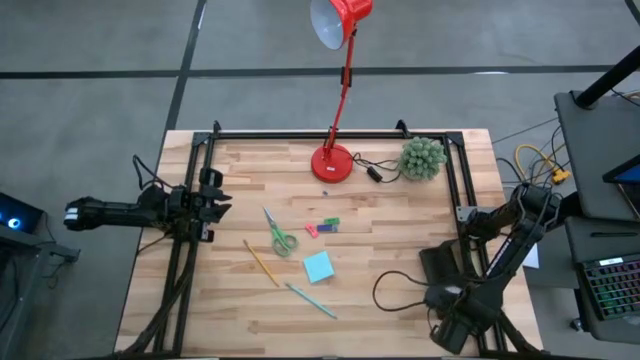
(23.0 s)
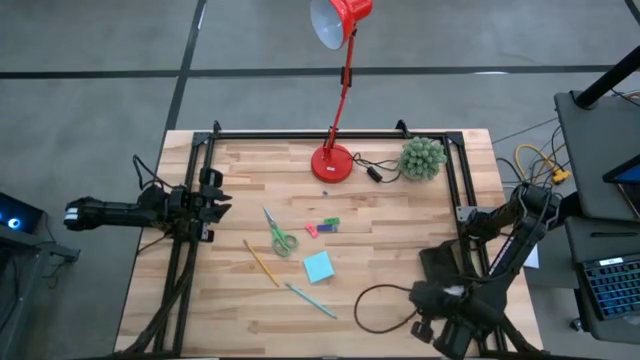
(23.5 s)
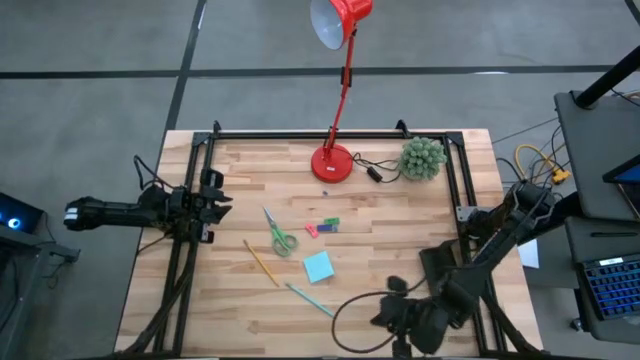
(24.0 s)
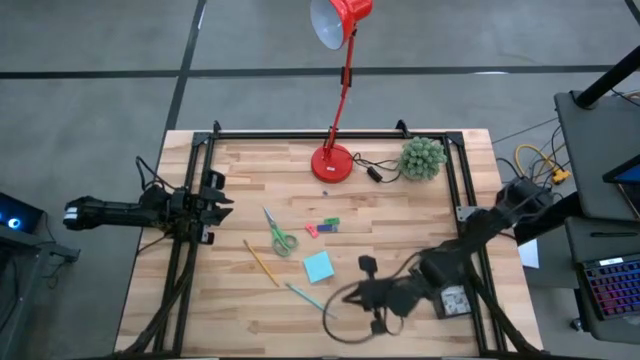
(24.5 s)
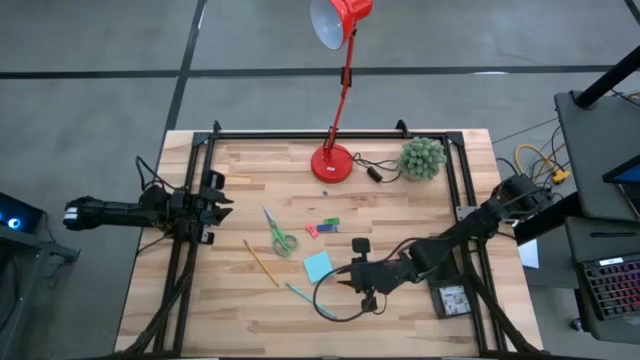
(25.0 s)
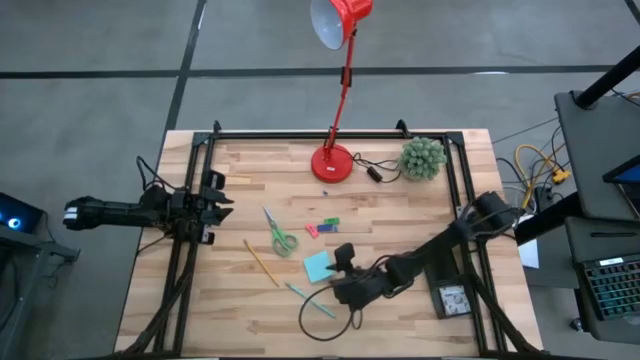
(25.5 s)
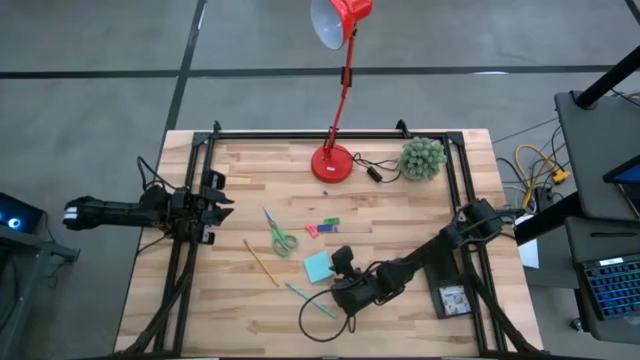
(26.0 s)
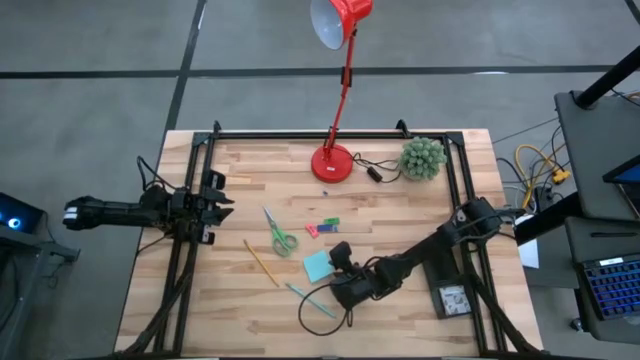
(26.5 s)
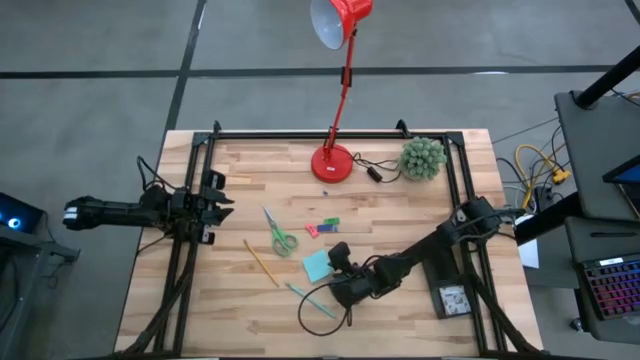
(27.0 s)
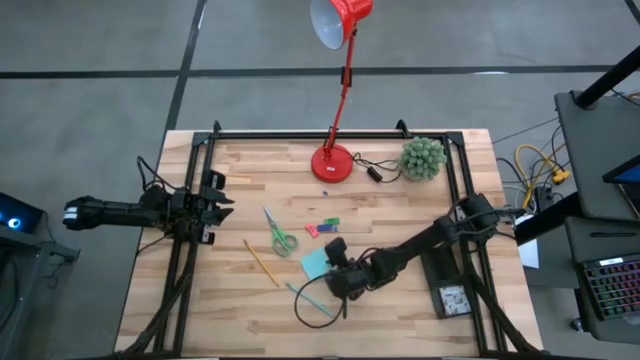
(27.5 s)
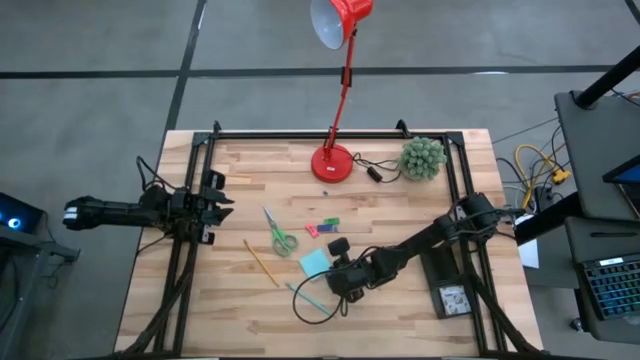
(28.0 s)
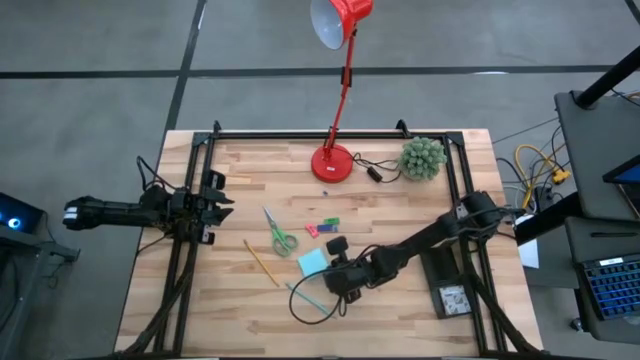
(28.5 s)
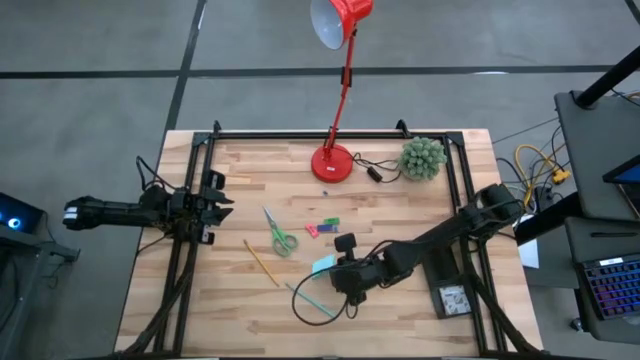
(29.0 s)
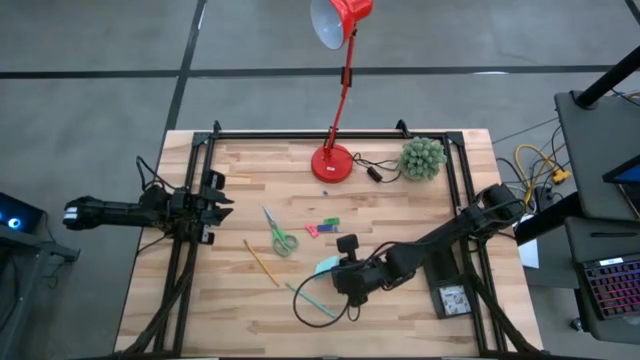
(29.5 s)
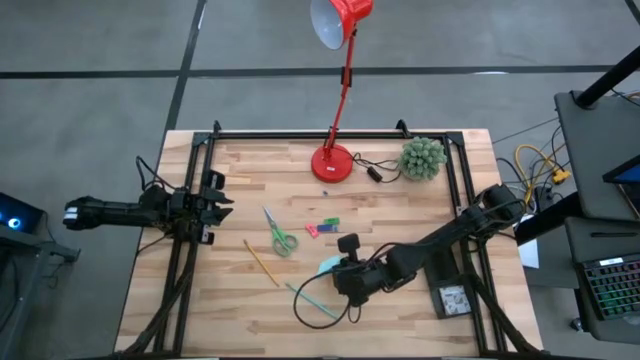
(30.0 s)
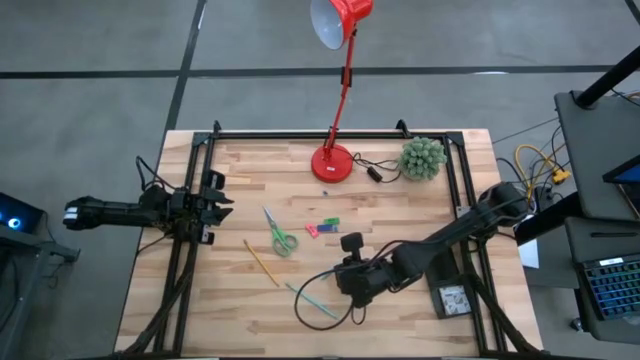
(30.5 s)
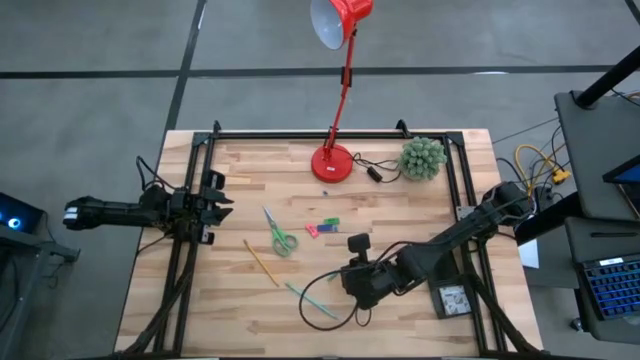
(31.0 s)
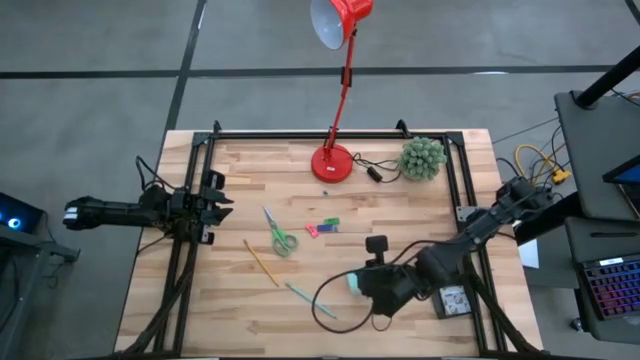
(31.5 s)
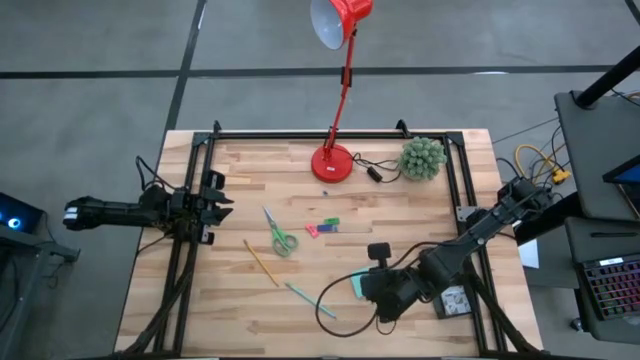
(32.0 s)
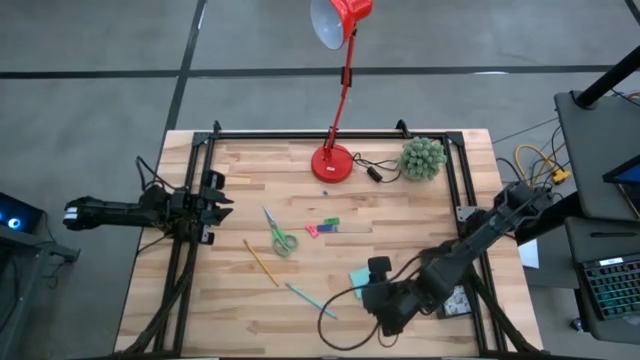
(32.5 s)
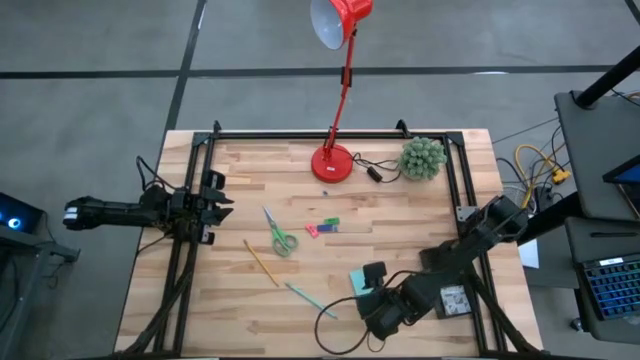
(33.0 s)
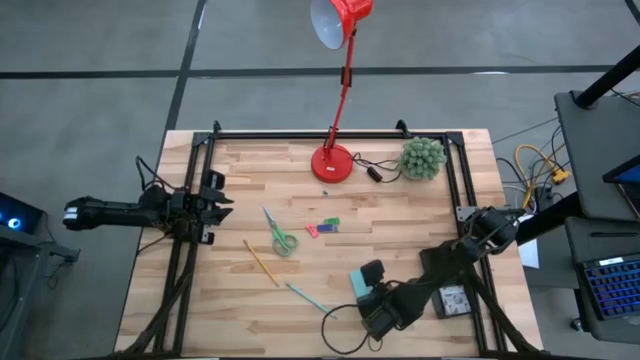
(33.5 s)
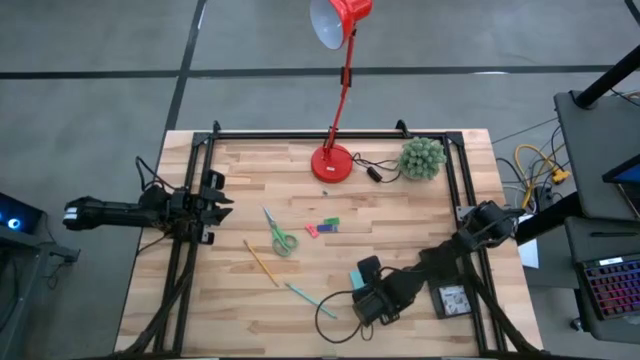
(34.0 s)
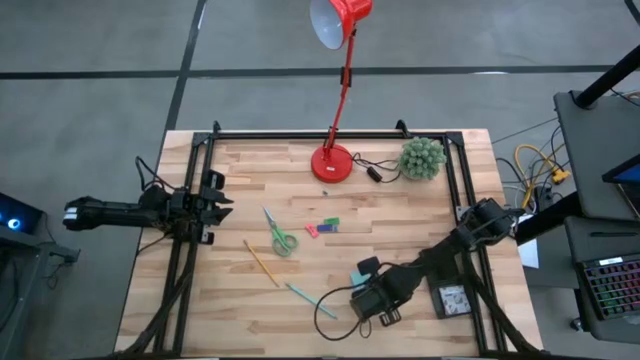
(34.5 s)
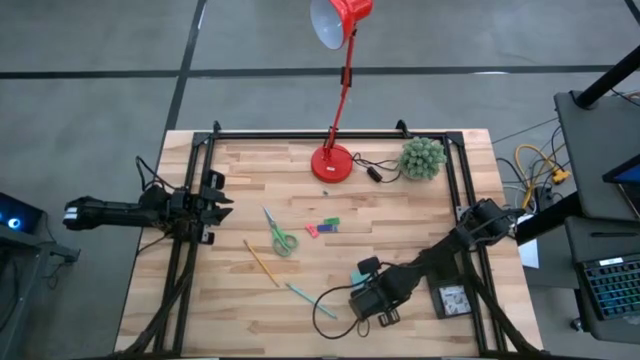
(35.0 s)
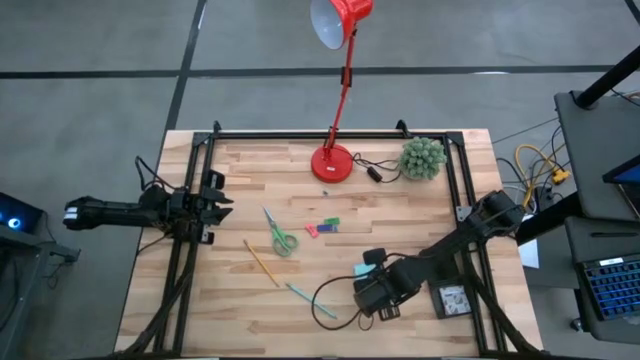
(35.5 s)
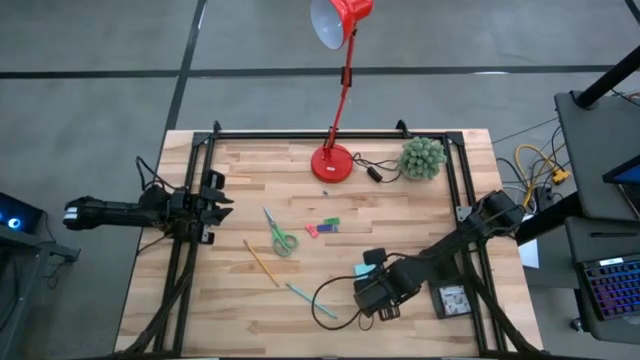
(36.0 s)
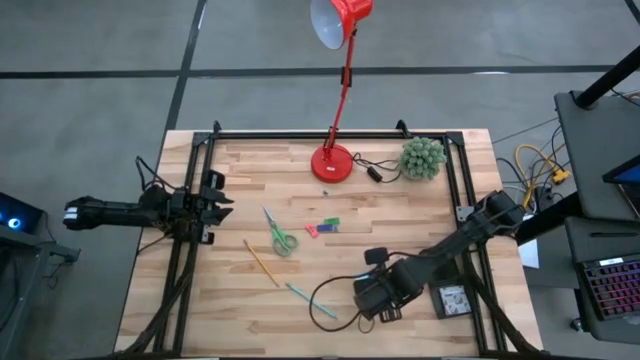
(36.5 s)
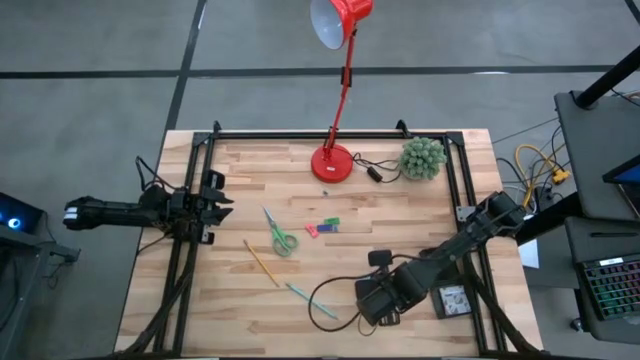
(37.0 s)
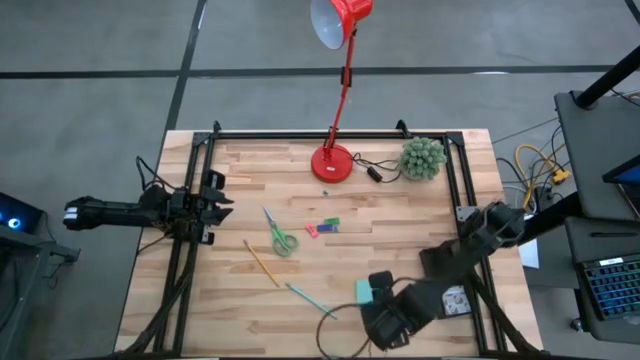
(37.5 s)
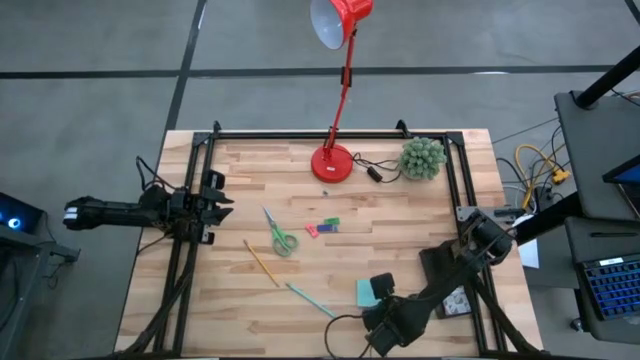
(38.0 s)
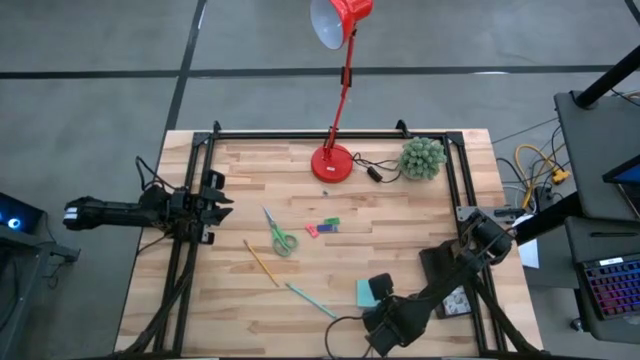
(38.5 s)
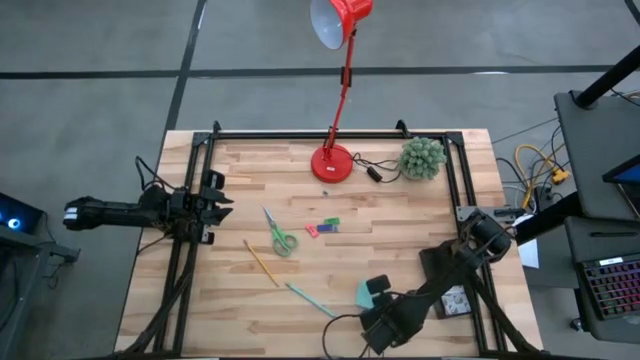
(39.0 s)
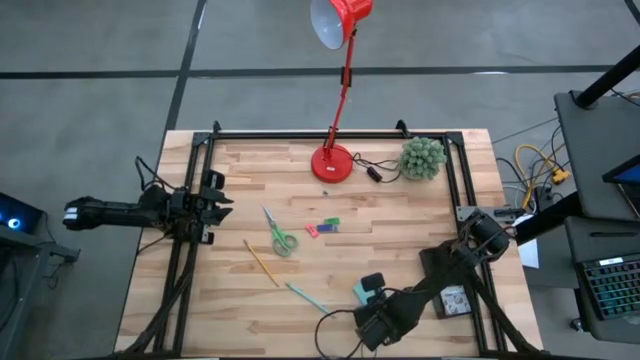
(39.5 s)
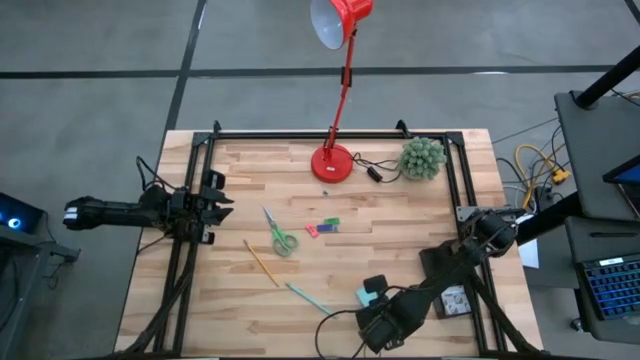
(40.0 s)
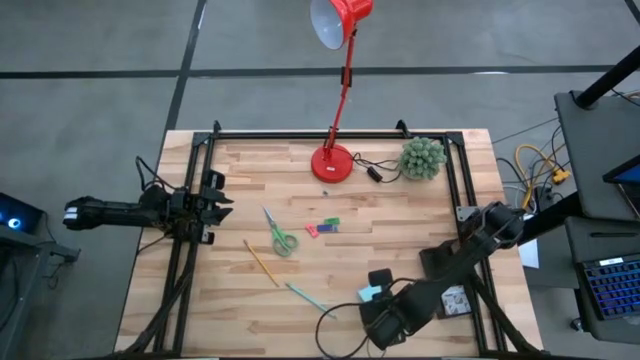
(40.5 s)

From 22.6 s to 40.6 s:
Task: Pick and place office supplies into organizer
Put the blue sticky note into the black desk organizer

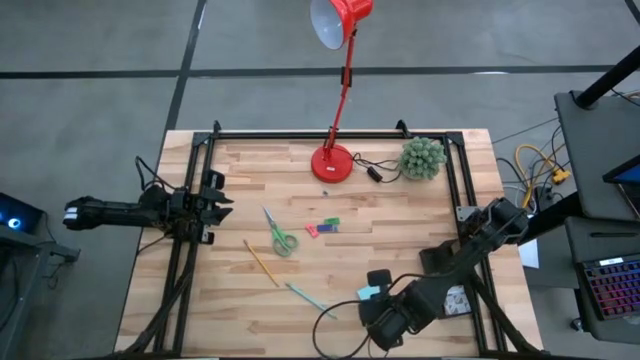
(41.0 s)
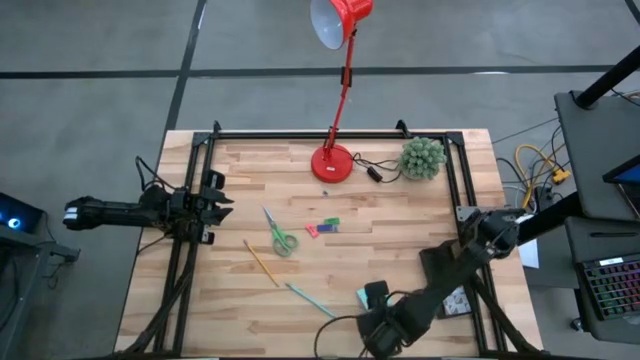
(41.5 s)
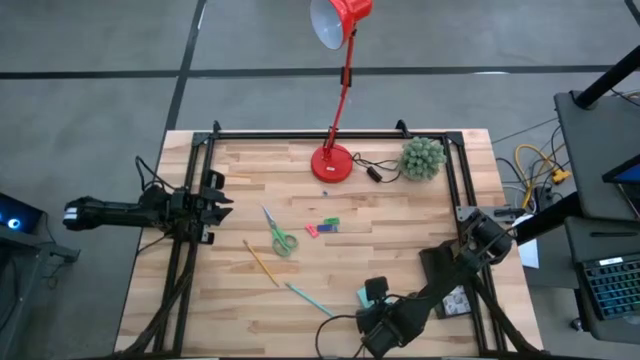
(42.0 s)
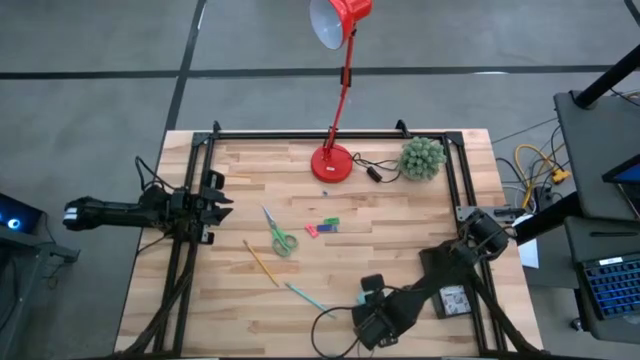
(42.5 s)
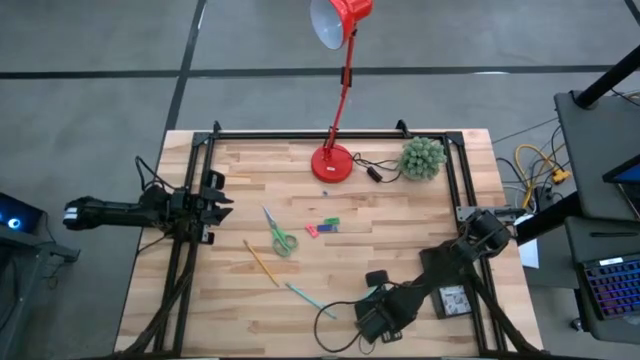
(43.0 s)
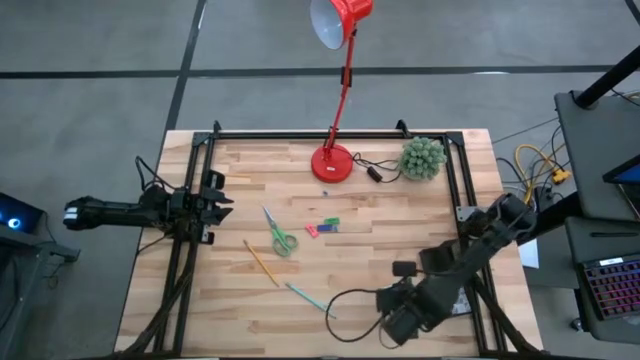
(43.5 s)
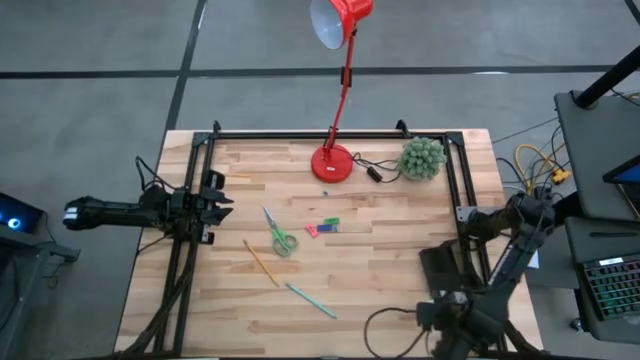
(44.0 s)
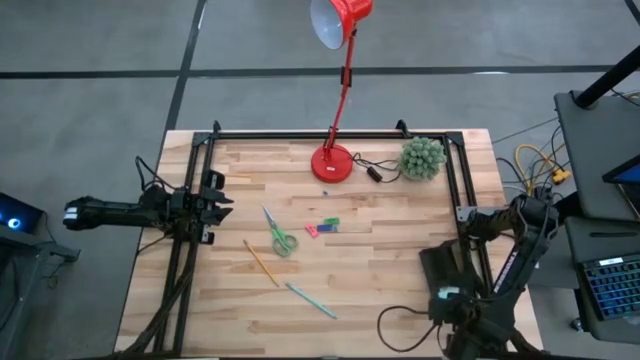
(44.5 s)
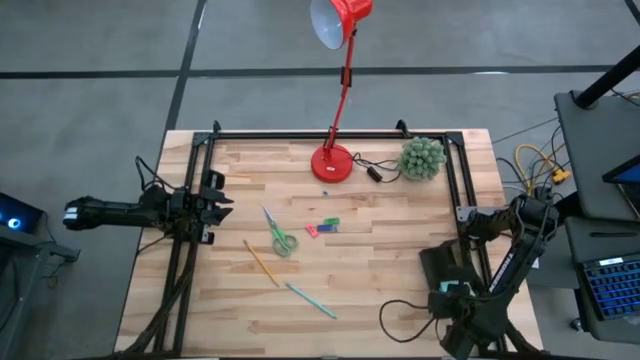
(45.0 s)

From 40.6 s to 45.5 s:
Put the blue sticky note into the black desk organizer
